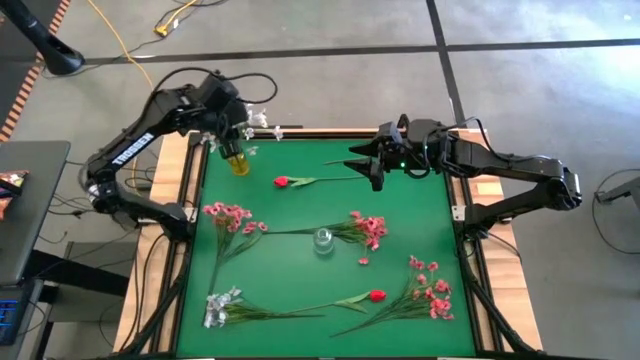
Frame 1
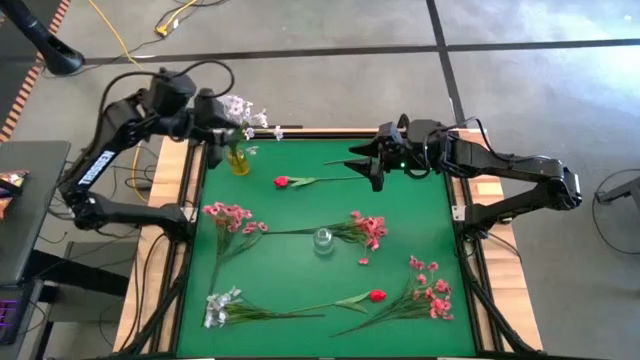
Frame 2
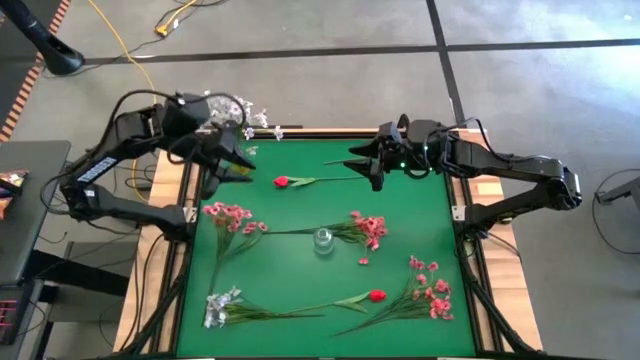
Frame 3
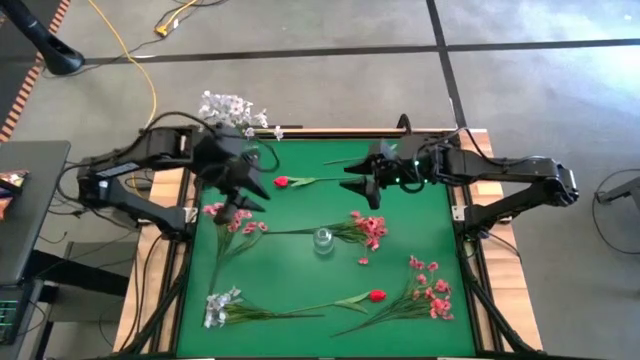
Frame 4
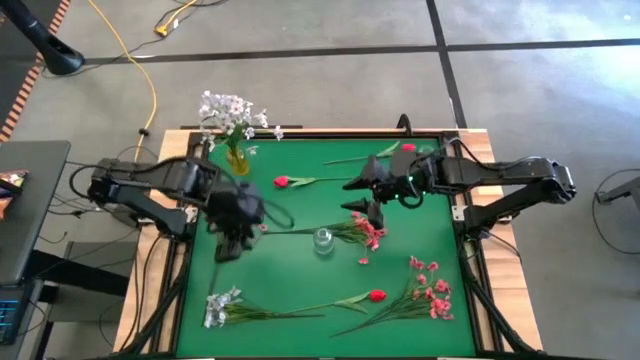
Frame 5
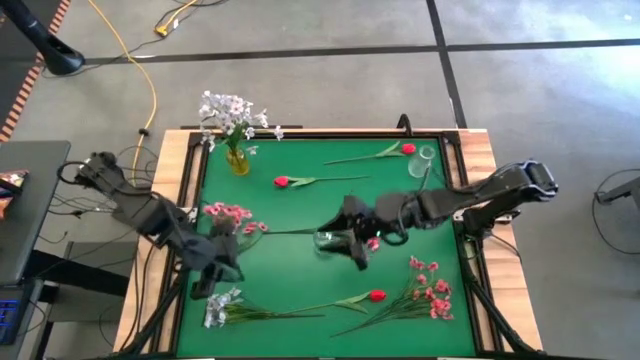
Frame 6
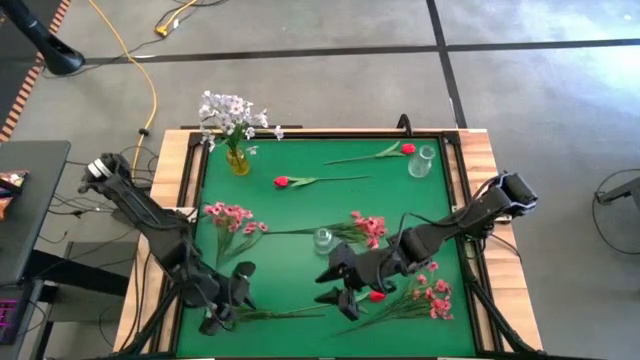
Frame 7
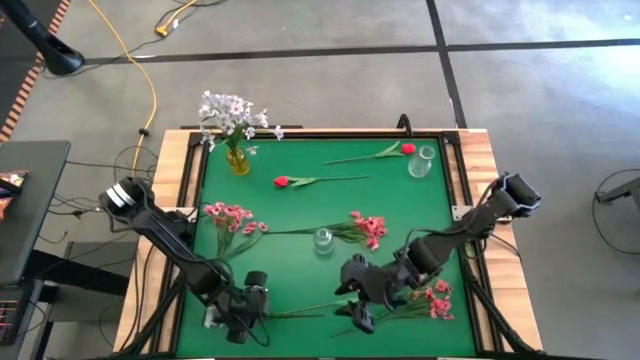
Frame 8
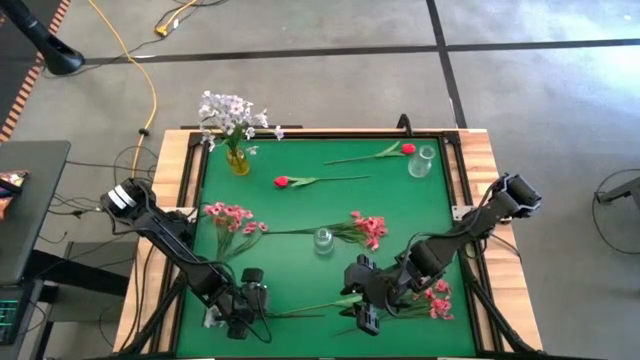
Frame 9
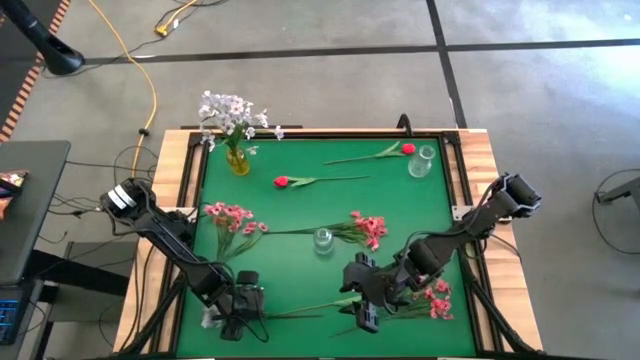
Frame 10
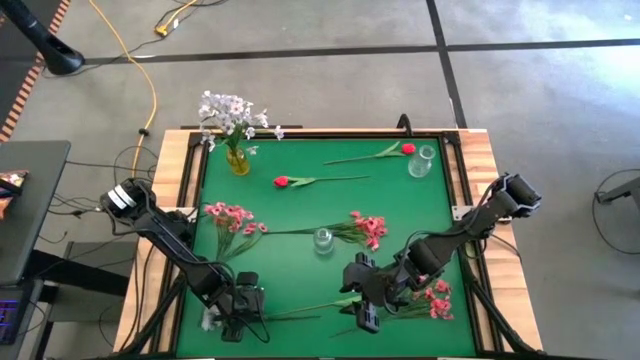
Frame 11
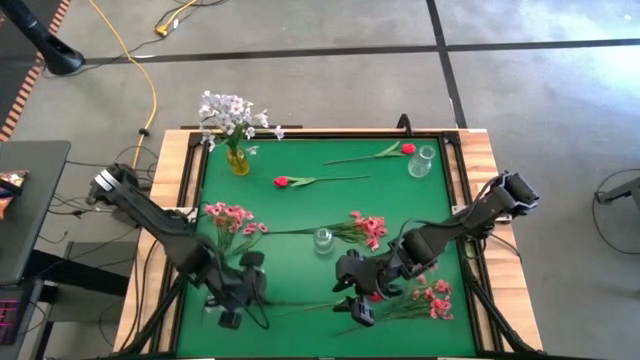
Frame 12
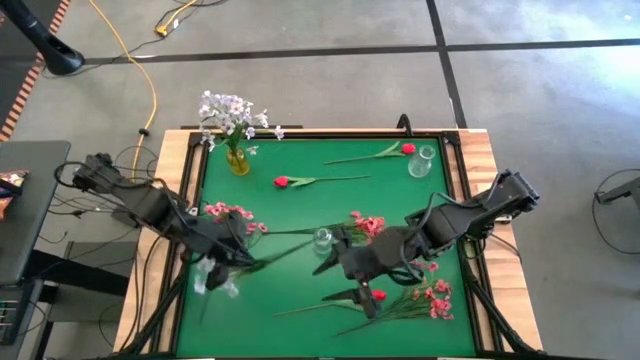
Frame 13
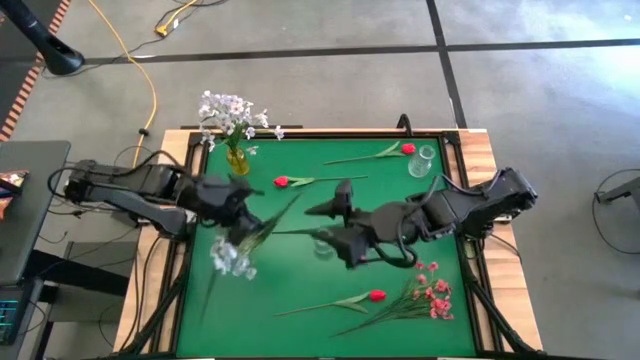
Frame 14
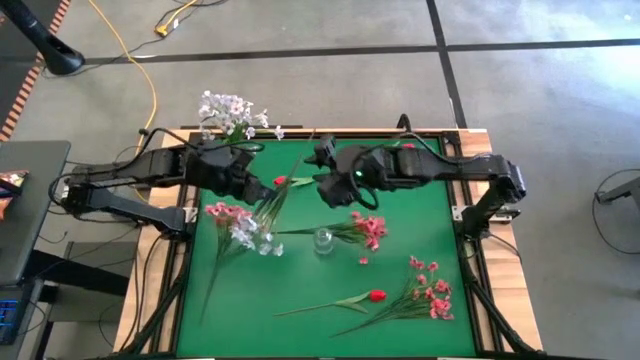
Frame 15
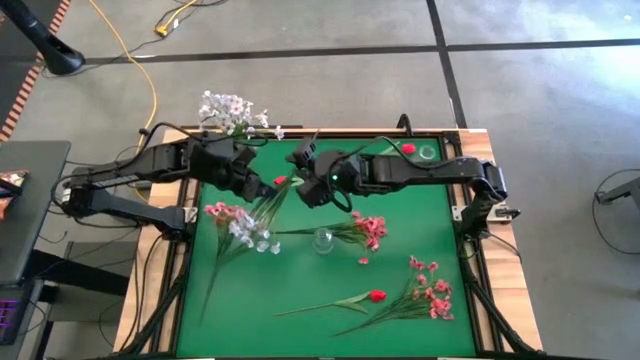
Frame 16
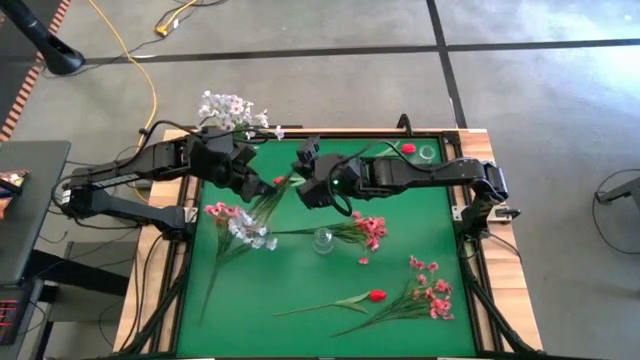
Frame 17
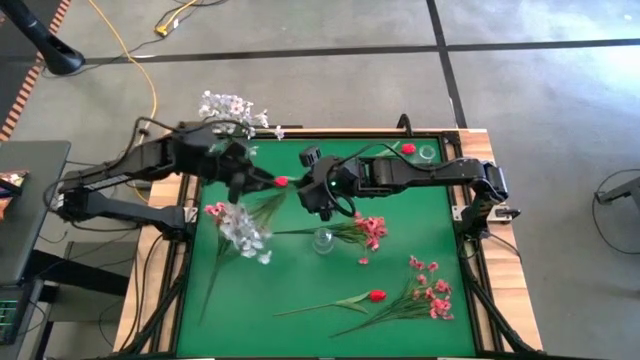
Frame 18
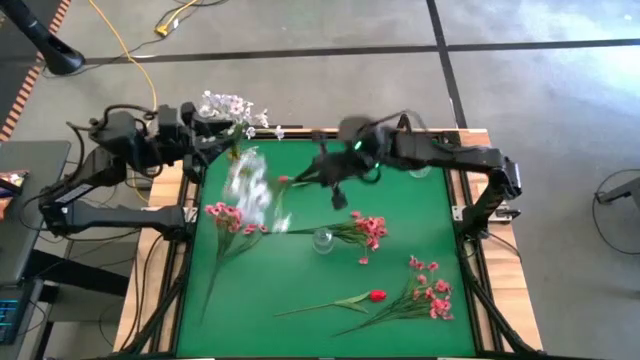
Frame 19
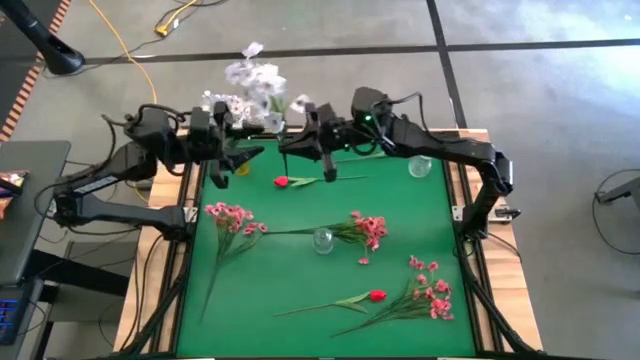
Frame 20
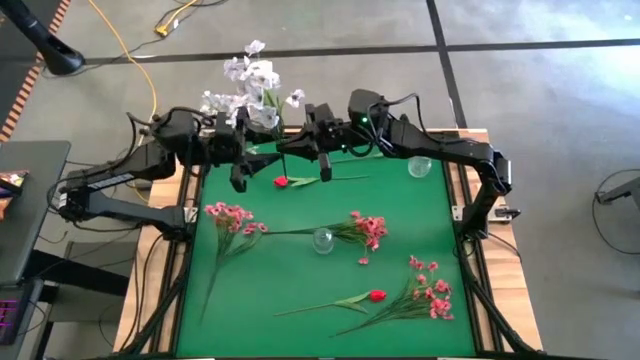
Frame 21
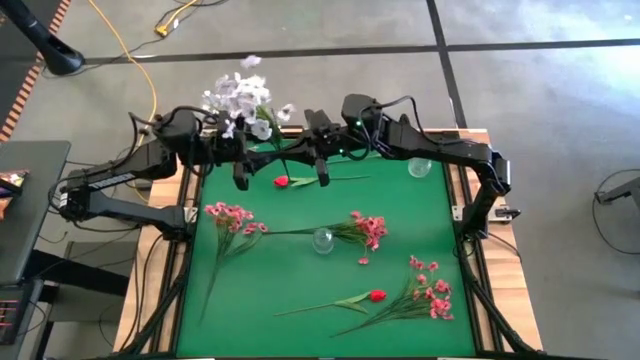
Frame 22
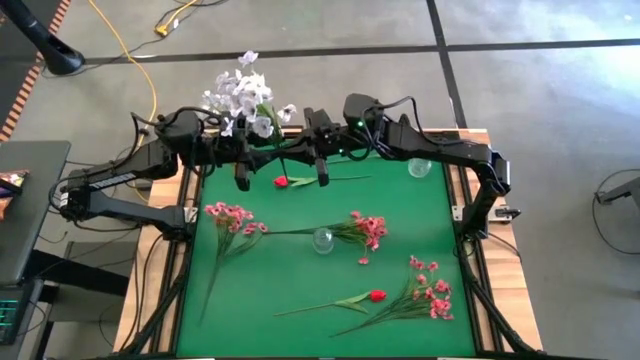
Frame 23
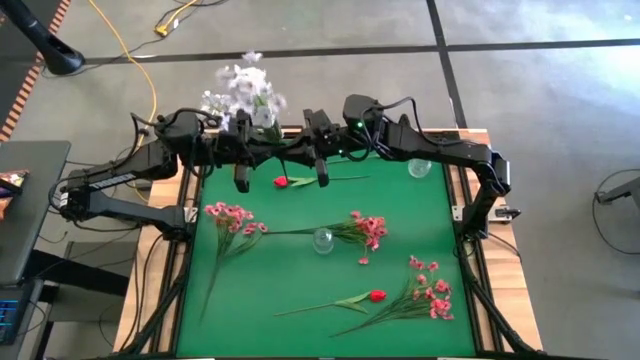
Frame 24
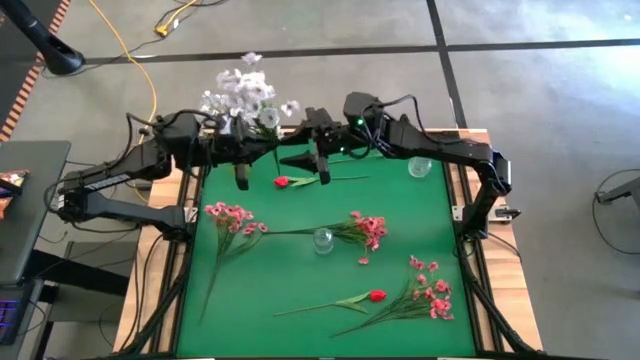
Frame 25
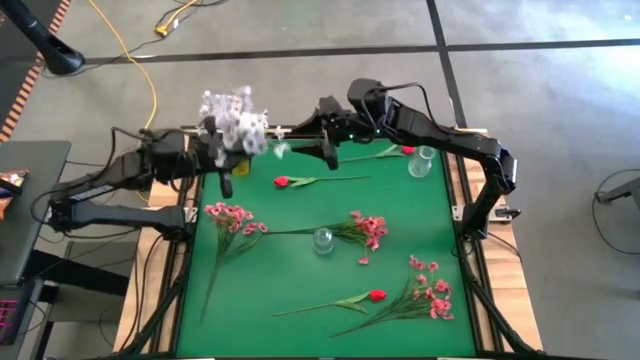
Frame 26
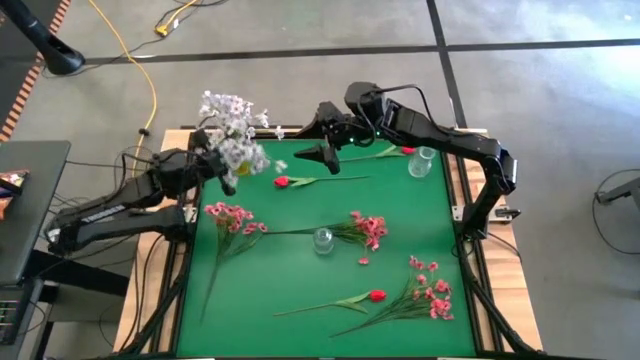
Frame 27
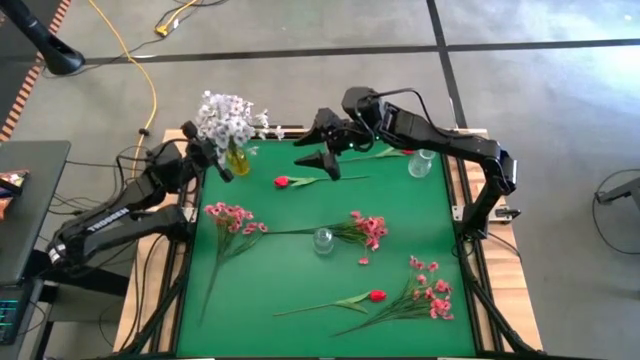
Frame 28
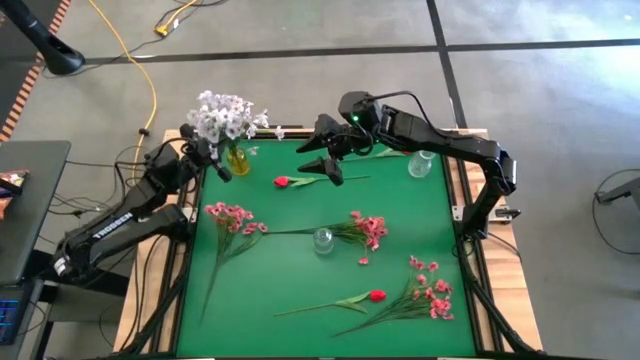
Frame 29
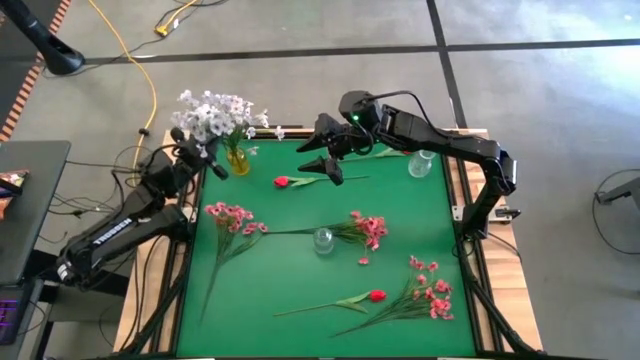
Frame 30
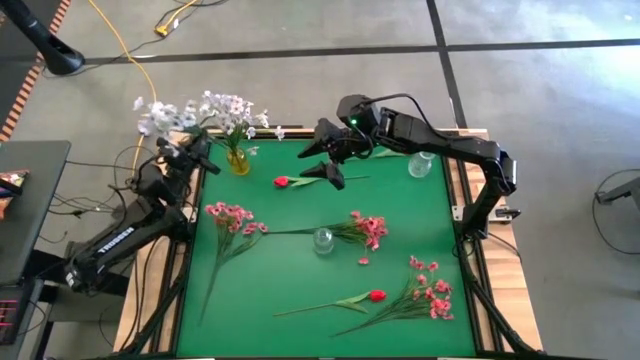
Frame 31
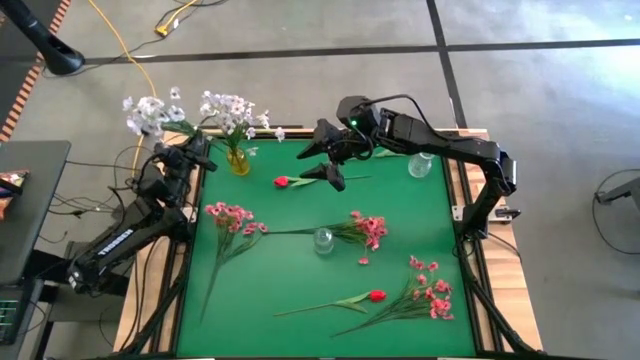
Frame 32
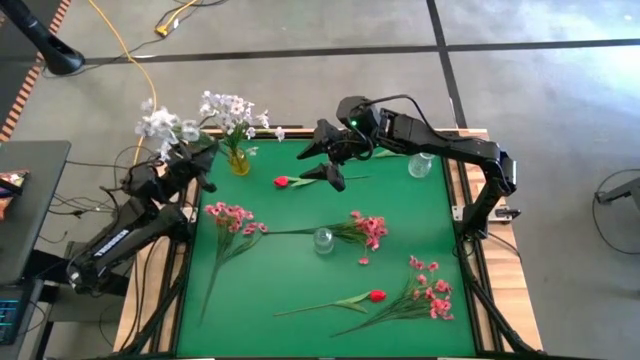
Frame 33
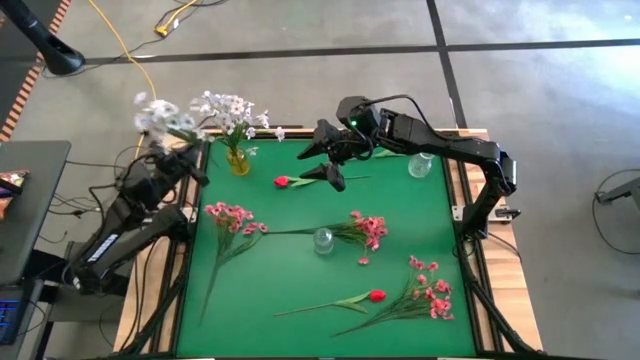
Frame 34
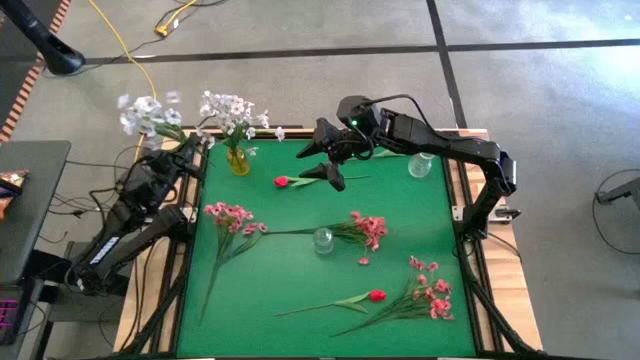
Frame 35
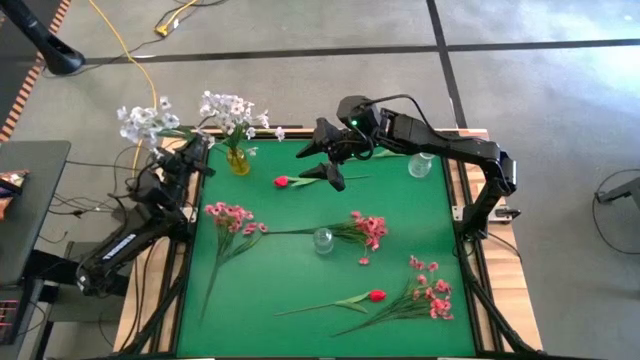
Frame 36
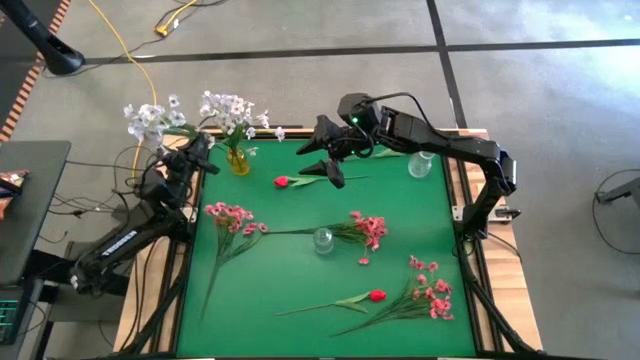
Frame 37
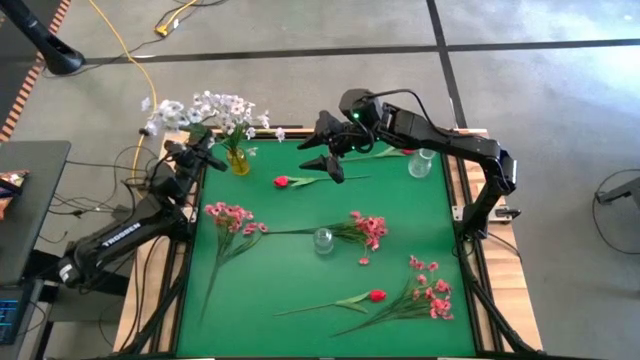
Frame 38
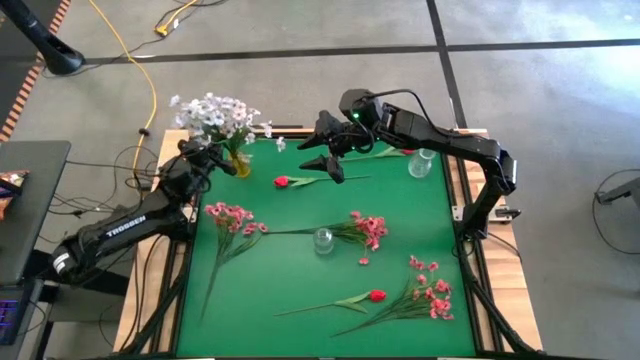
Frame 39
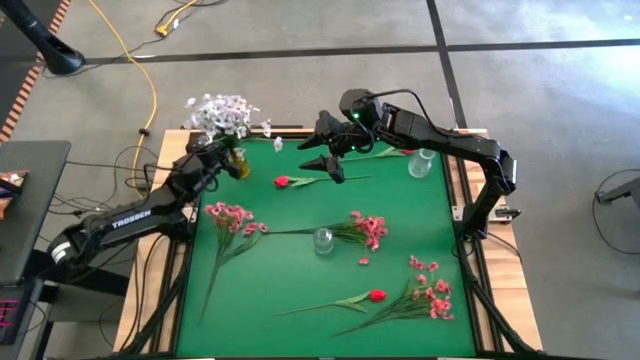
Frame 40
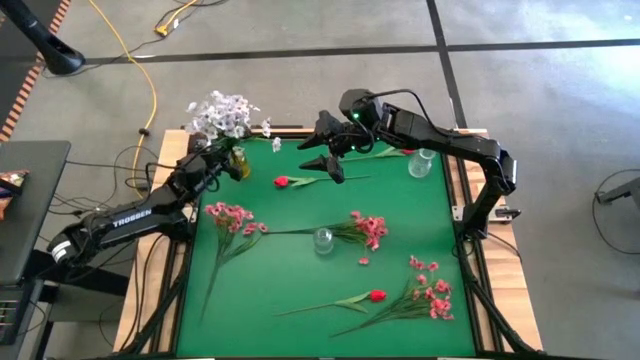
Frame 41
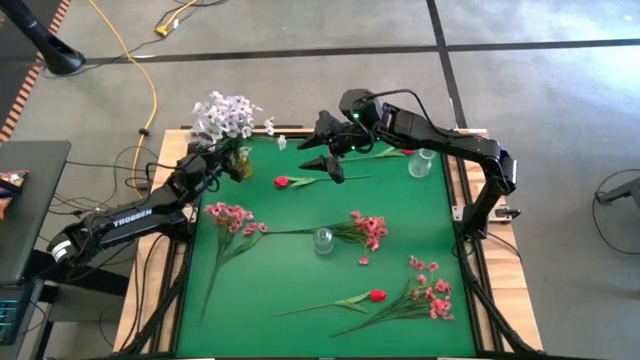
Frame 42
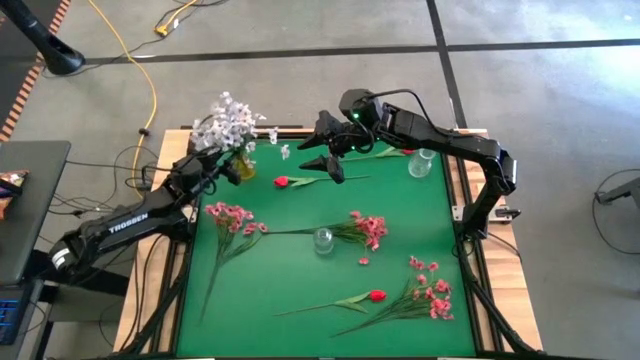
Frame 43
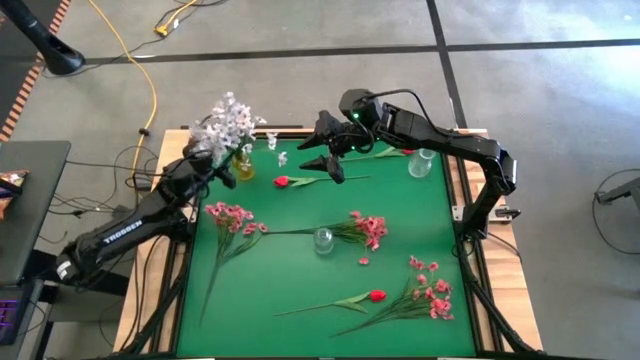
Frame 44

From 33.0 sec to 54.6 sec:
Task: Sort flowers into vase by color
Put the white flowers into the yellow vase
